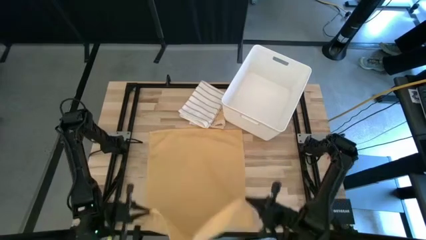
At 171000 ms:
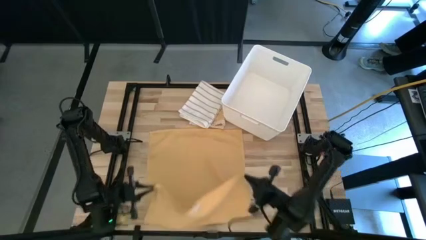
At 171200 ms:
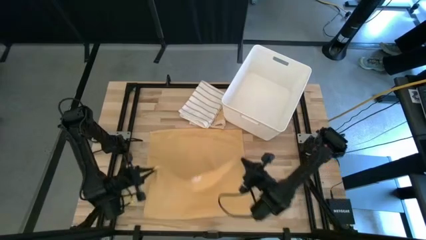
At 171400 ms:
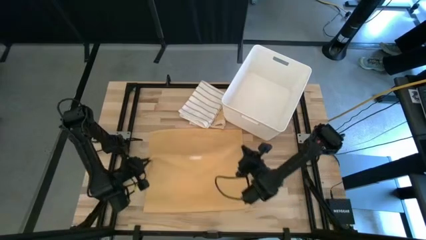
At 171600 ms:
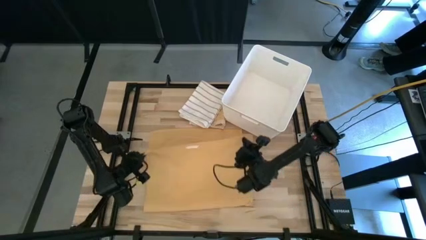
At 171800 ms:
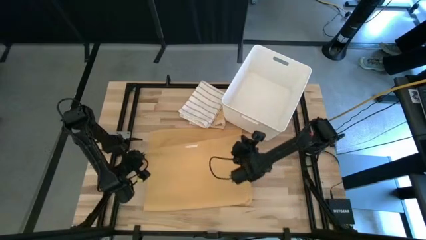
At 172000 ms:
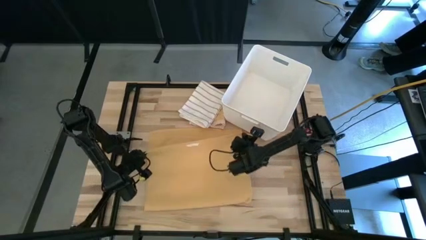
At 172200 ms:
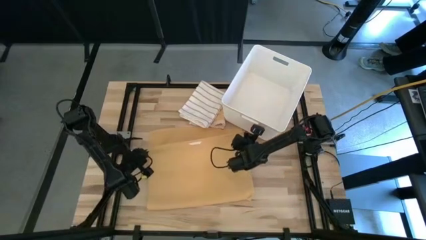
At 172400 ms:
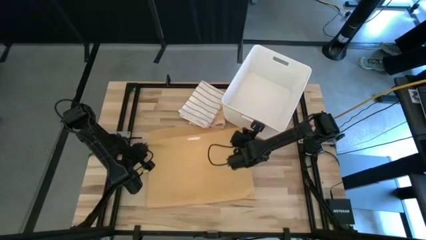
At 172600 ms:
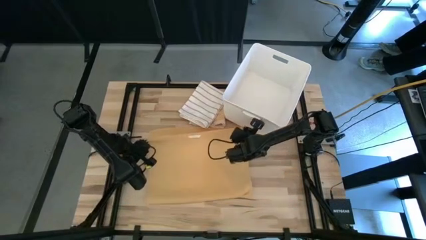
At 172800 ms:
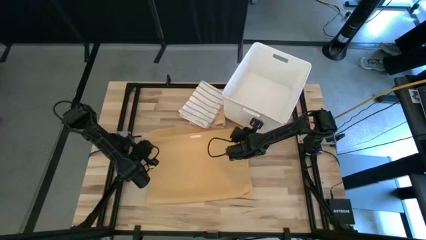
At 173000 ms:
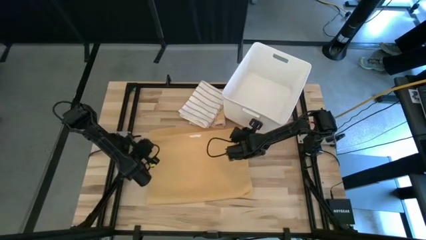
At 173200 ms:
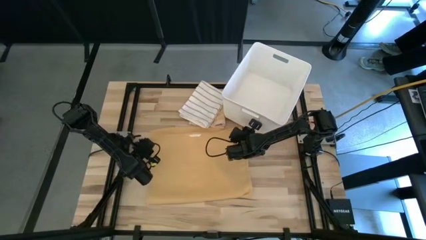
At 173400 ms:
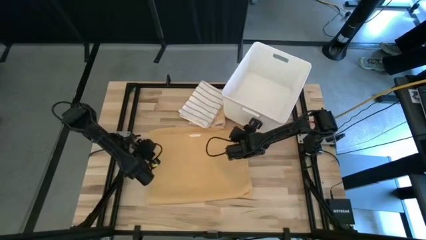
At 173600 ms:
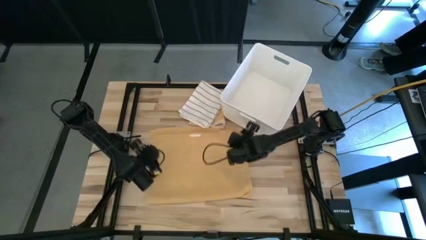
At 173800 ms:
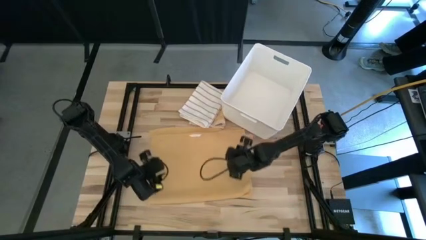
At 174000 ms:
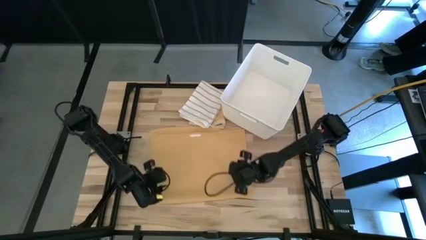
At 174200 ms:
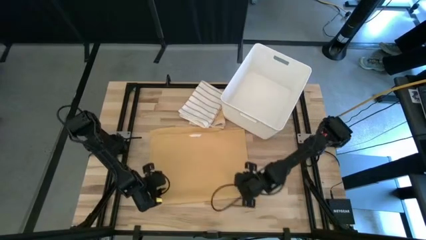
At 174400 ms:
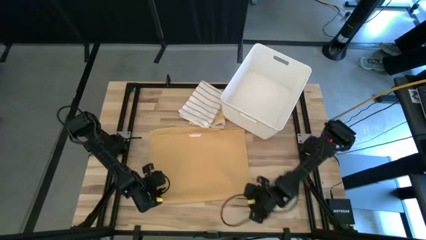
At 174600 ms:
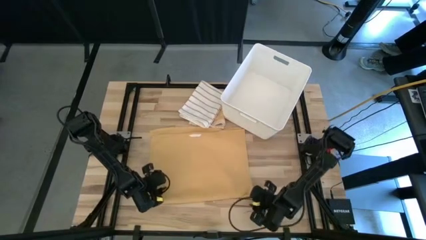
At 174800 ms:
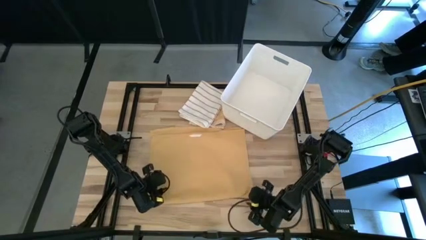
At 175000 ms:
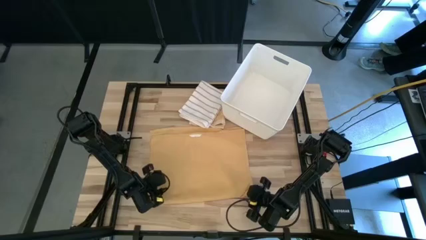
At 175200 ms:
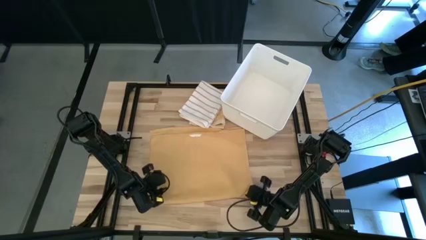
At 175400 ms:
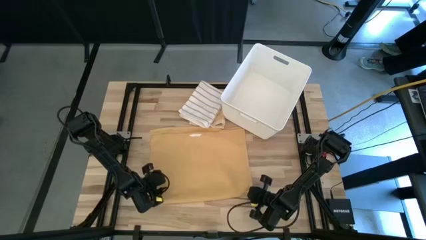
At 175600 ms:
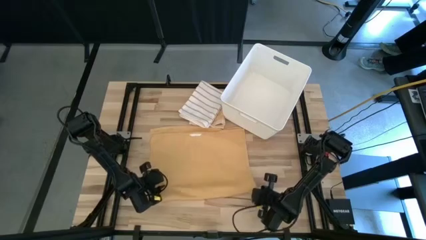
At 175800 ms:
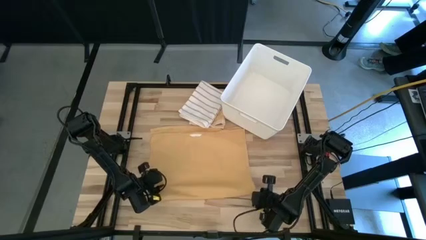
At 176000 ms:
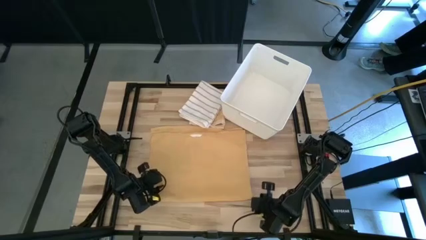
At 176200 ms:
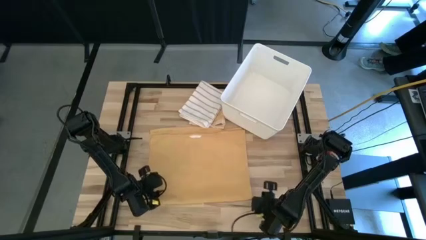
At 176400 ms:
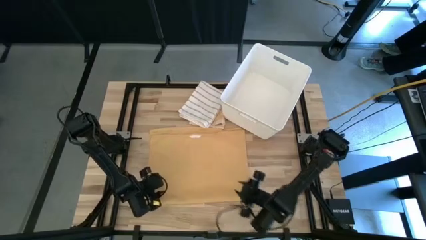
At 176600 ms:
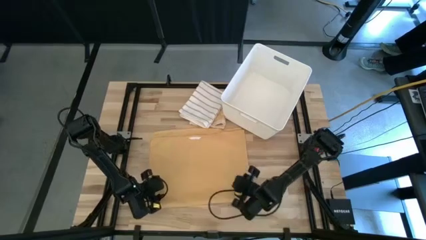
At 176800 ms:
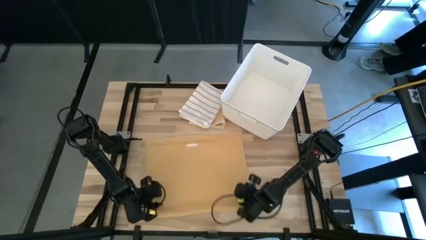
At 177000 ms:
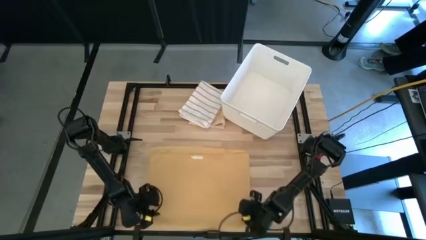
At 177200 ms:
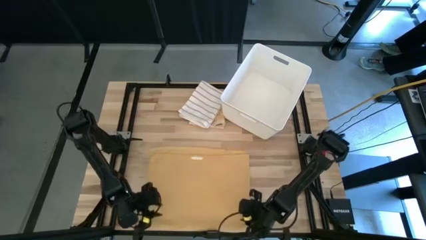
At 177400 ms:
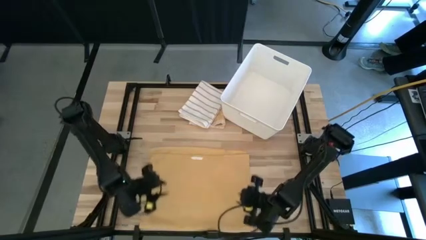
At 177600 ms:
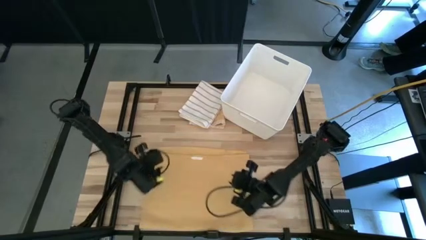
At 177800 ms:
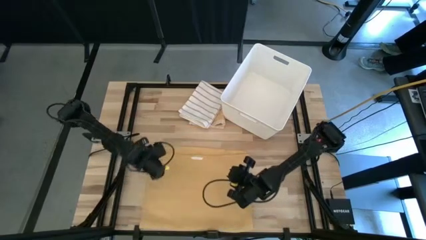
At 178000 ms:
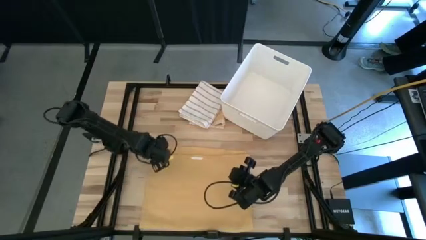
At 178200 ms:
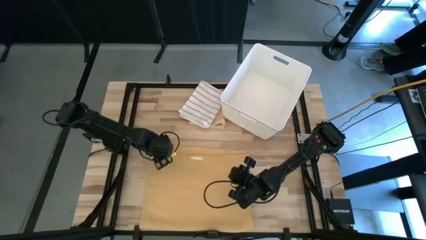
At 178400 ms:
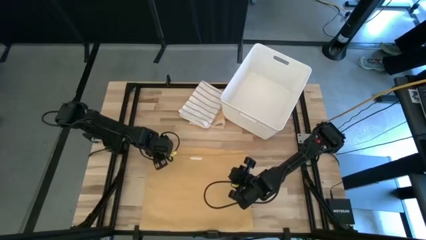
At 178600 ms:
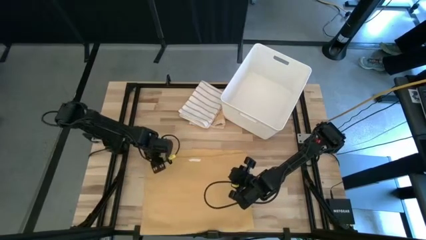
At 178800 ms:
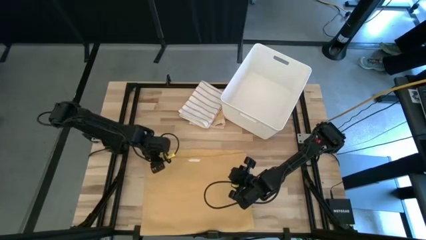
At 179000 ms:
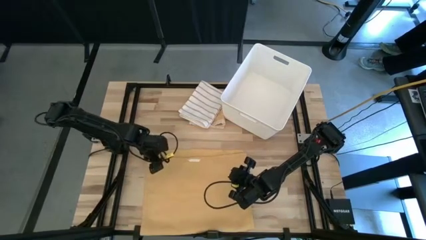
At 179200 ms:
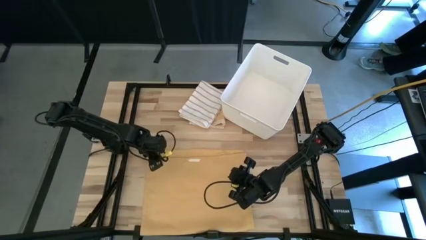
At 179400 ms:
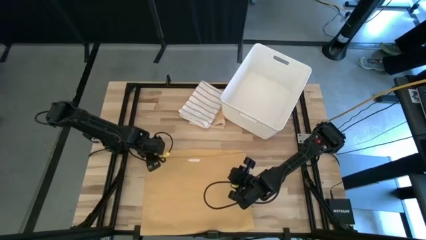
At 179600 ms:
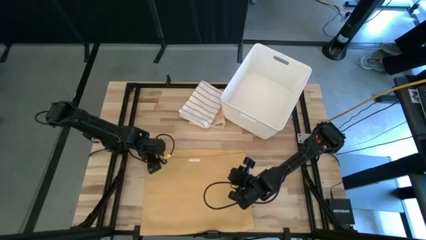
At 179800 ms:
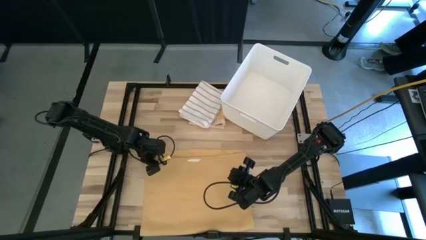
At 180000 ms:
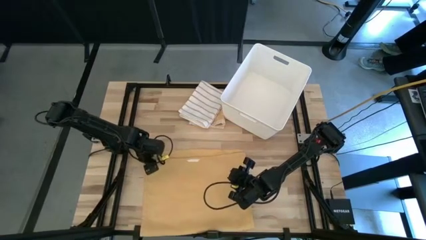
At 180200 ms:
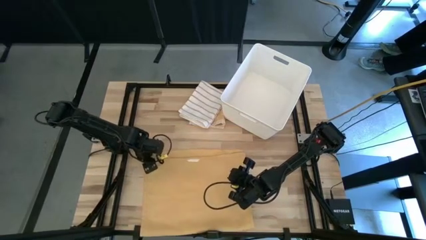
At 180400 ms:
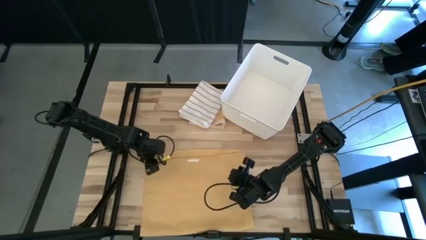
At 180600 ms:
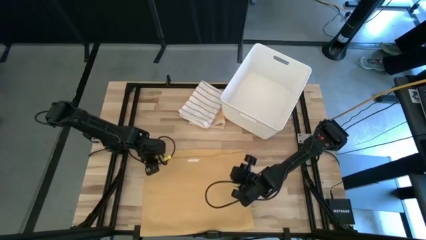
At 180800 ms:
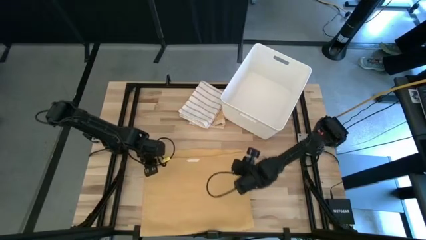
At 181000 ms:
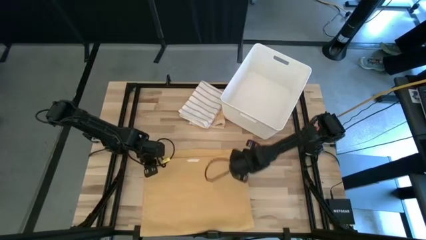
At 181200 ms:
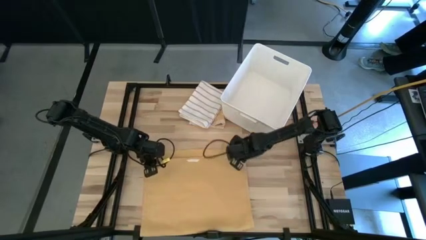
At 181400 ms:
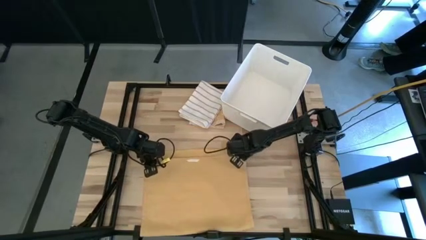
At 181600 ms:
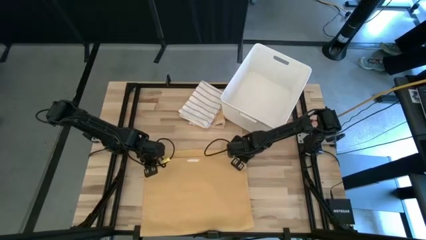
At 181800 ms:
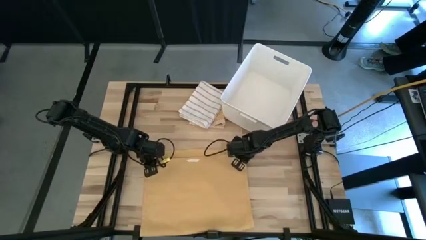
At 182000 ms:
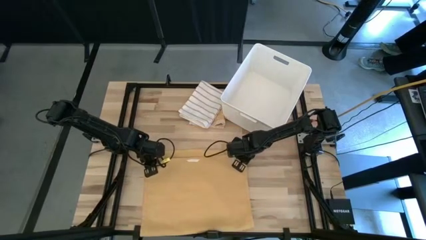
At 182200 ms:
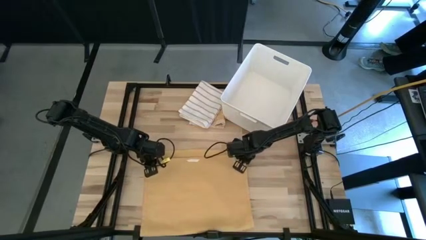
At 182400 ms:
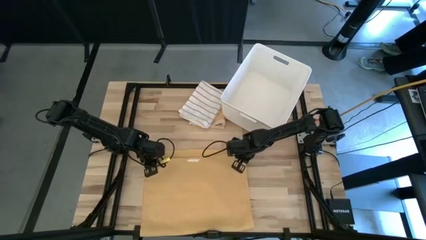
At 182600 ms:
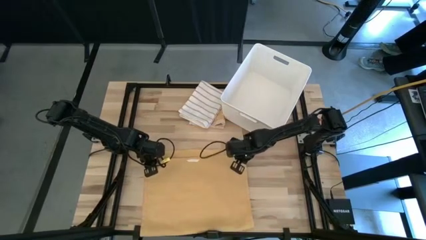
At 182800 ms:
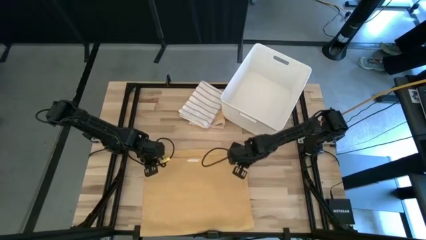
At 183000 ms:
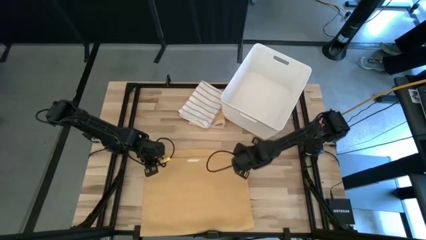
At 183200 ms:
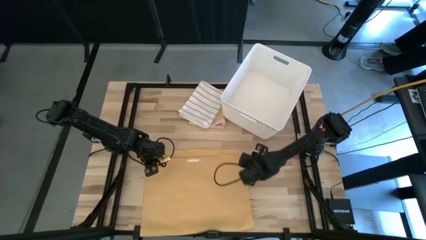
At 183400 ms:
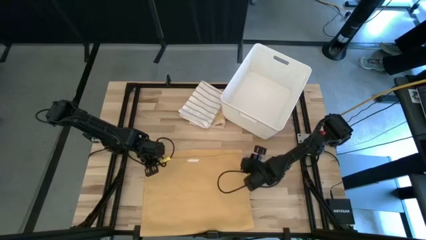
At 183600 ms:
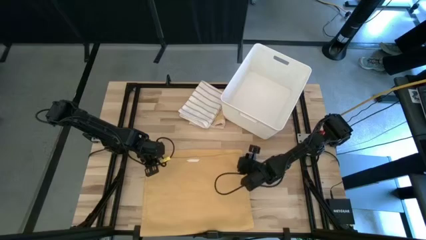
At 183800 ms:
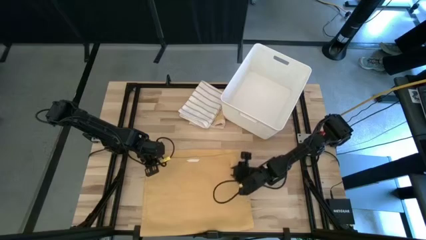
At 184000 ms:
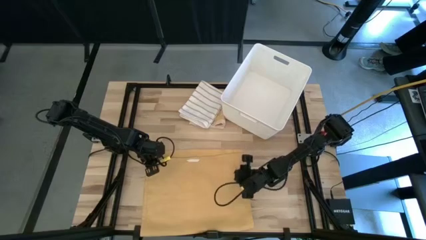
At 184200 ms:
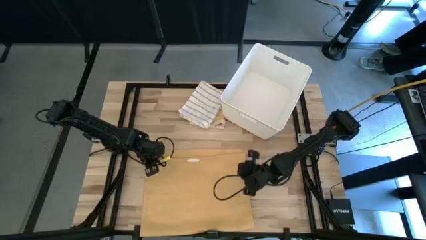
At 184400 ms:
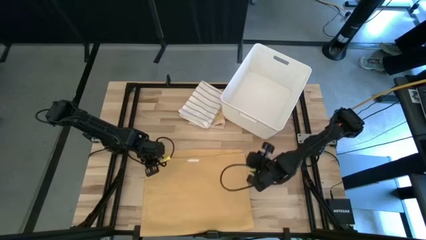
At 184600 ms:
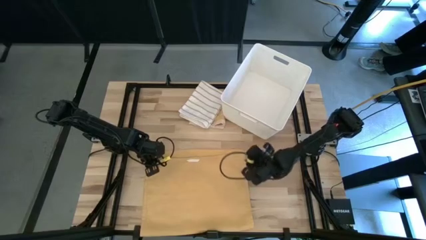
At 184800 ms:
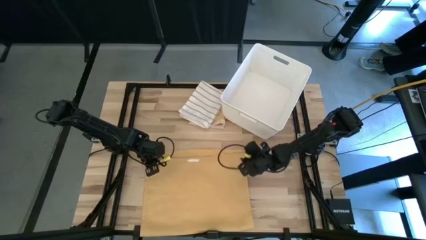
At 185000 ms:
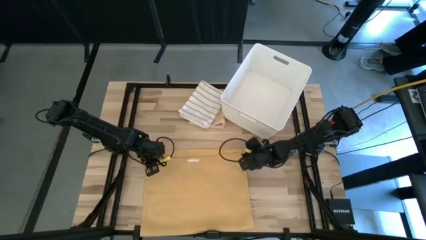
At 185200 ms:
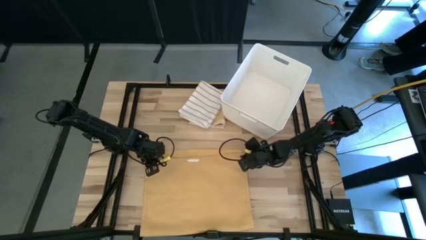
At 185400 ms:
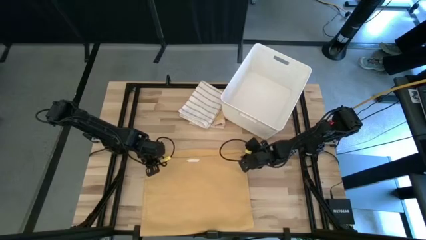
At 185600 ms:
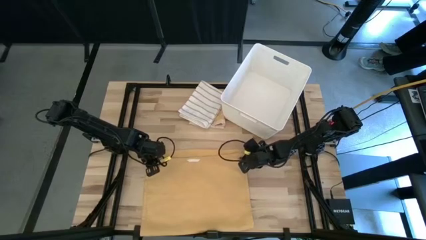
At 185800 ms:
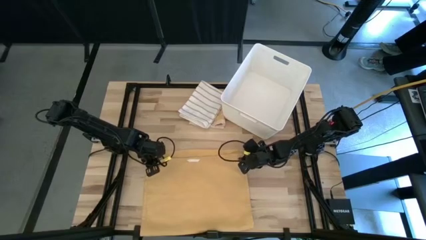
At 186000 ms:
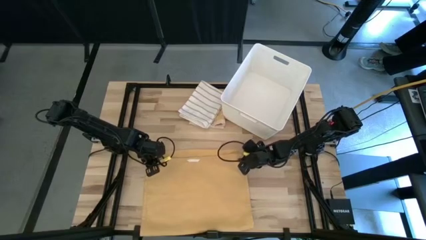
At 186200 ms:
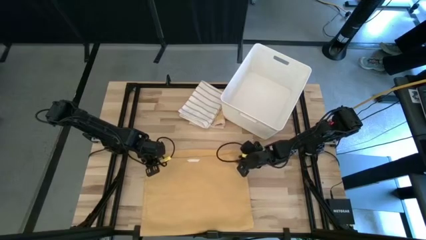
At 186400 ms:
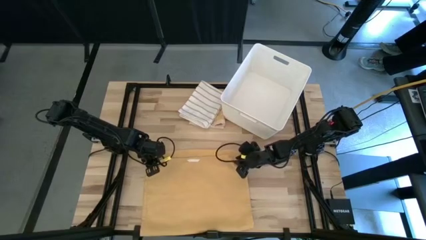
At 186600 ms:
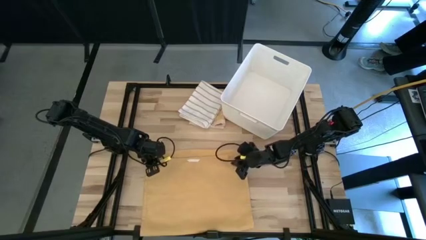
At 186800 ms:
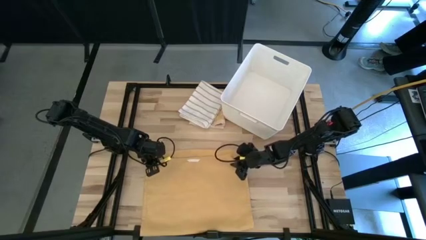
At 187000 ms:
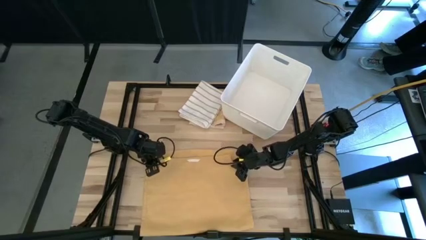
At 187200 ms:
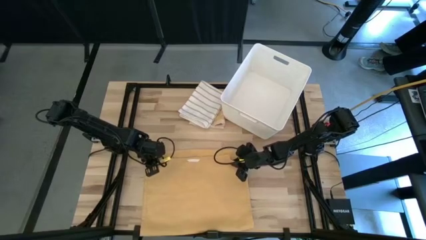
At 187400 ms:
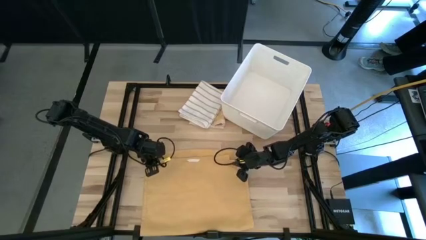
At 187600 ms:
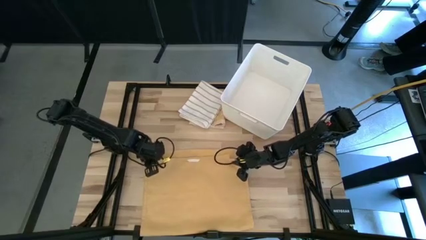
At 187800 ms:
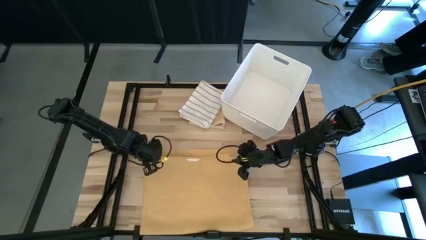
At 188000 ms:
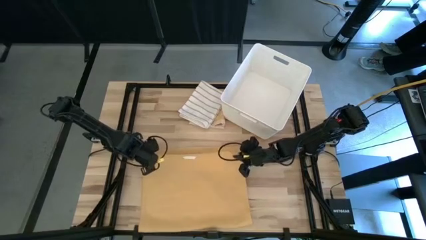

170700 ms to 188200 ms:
Task: Fold towel
Fold the yellow towel
